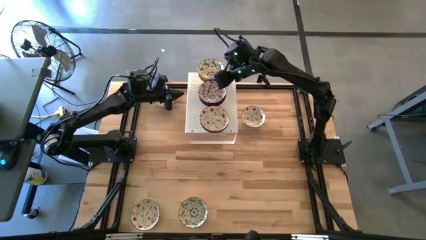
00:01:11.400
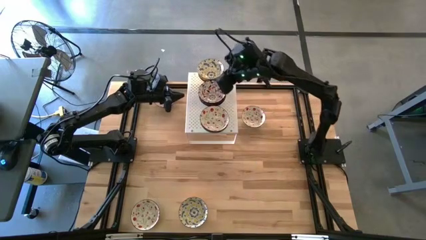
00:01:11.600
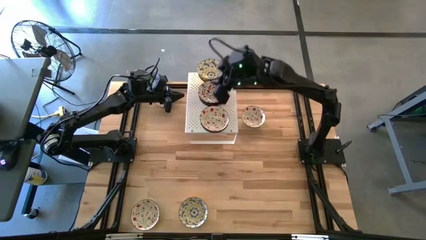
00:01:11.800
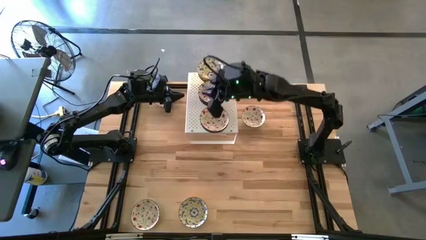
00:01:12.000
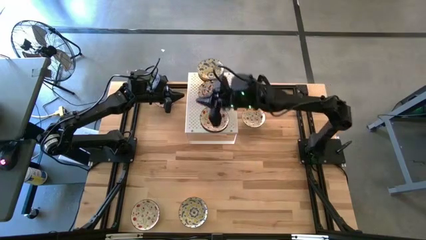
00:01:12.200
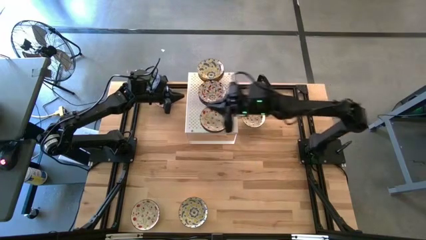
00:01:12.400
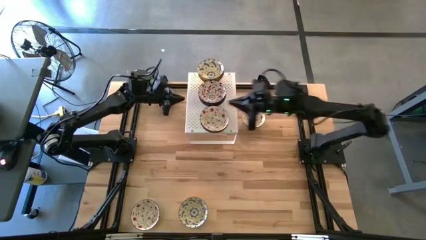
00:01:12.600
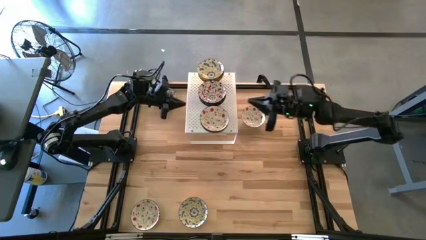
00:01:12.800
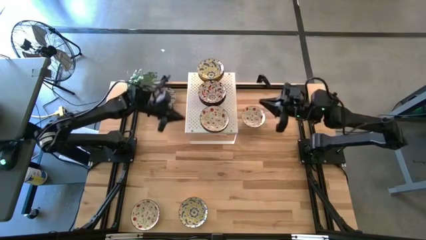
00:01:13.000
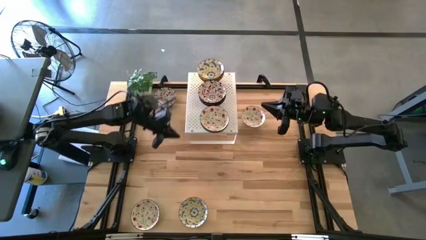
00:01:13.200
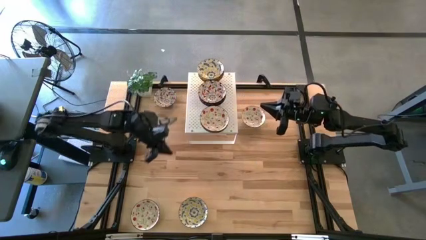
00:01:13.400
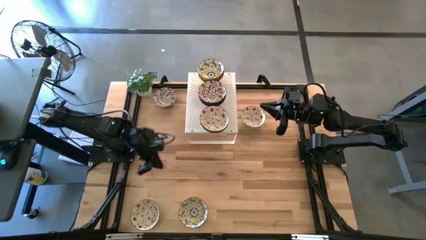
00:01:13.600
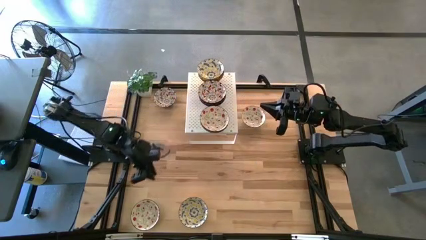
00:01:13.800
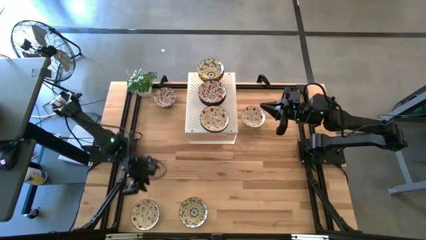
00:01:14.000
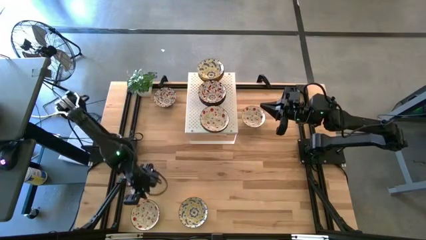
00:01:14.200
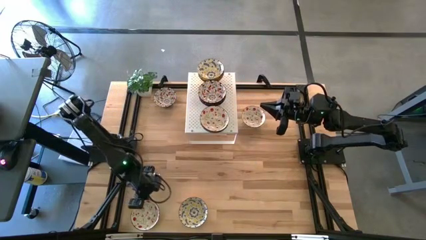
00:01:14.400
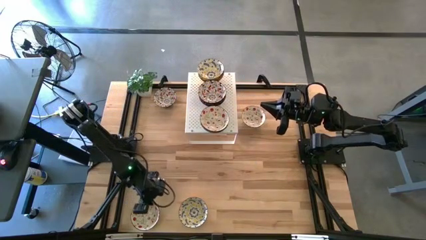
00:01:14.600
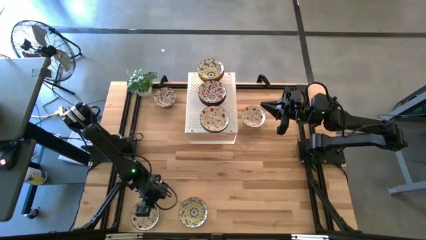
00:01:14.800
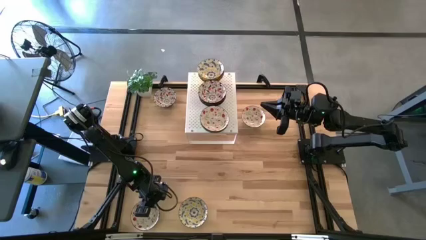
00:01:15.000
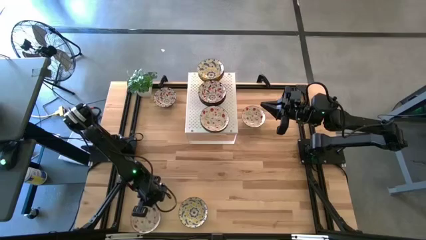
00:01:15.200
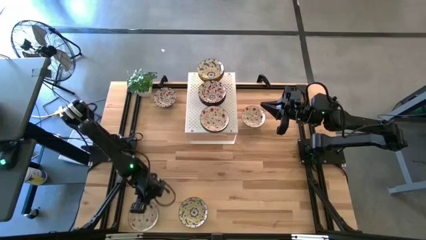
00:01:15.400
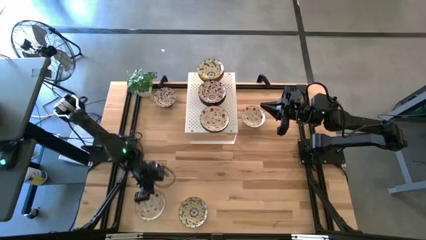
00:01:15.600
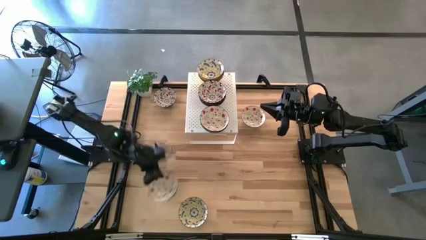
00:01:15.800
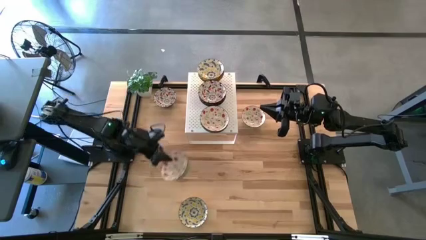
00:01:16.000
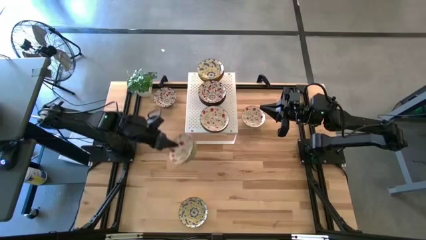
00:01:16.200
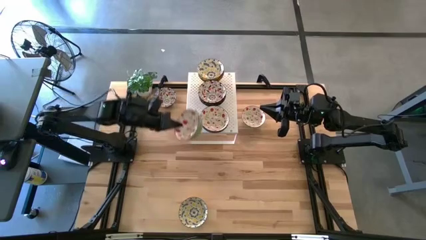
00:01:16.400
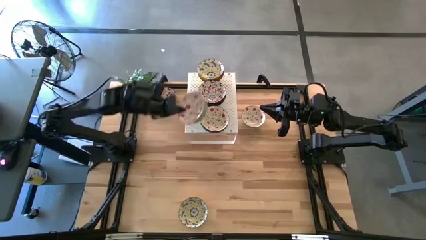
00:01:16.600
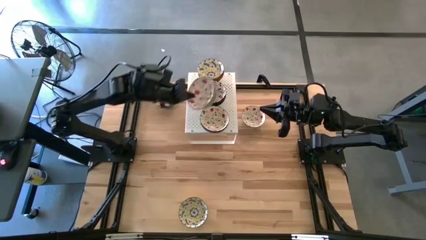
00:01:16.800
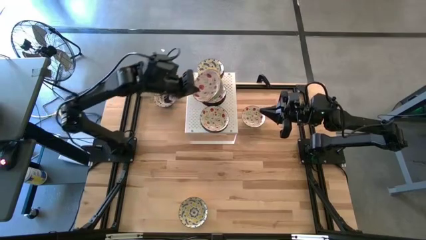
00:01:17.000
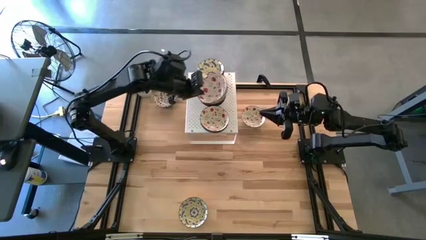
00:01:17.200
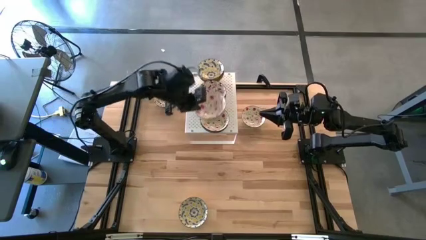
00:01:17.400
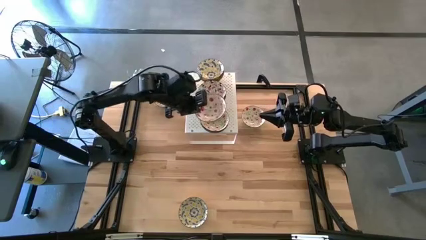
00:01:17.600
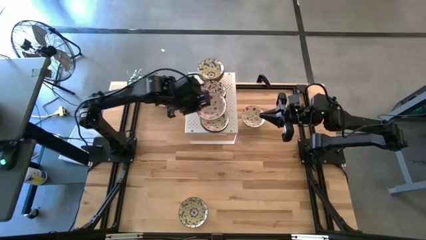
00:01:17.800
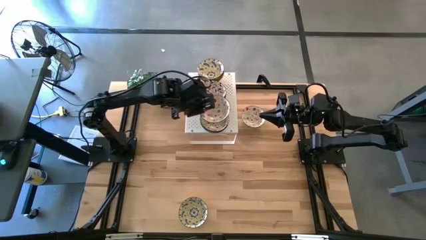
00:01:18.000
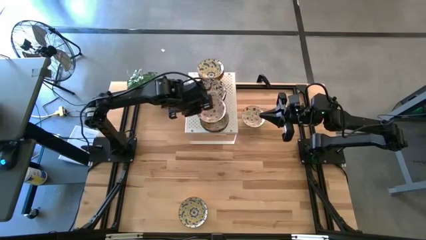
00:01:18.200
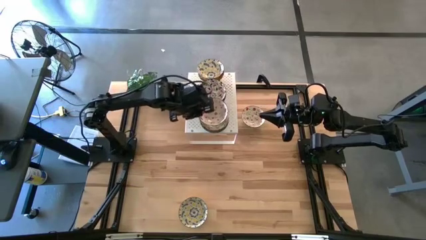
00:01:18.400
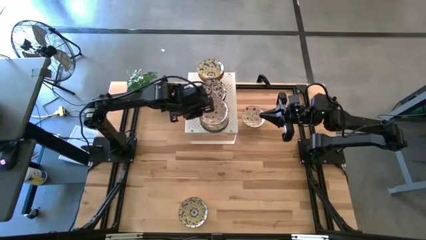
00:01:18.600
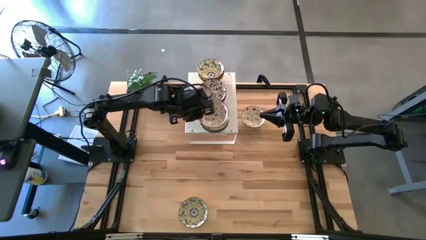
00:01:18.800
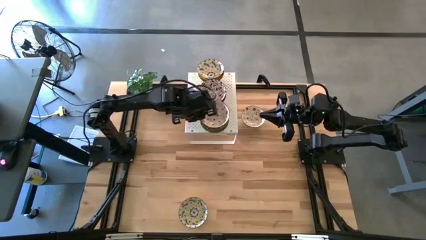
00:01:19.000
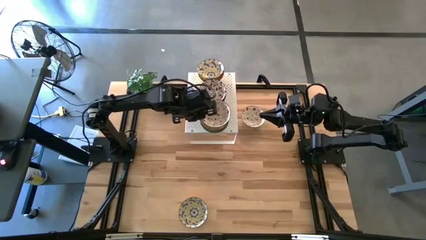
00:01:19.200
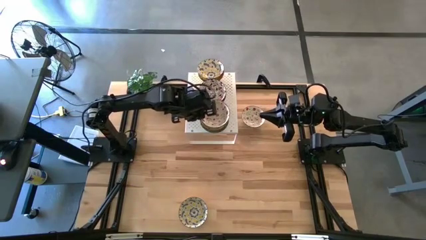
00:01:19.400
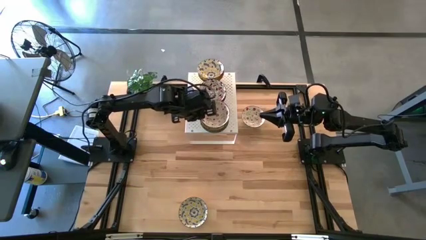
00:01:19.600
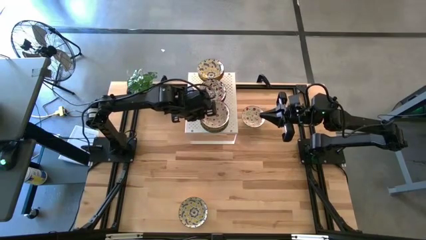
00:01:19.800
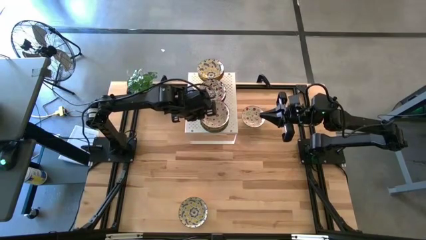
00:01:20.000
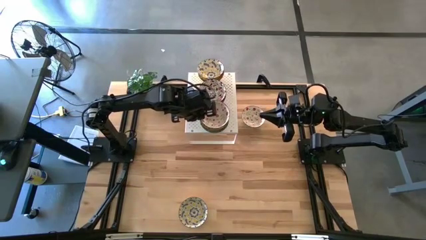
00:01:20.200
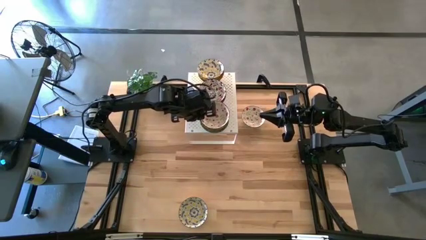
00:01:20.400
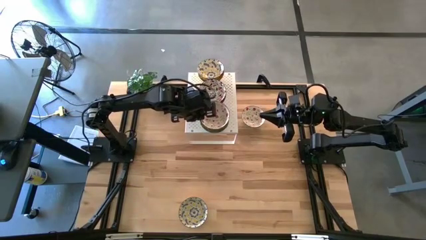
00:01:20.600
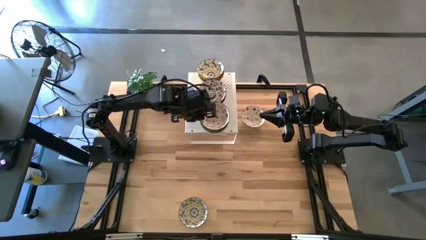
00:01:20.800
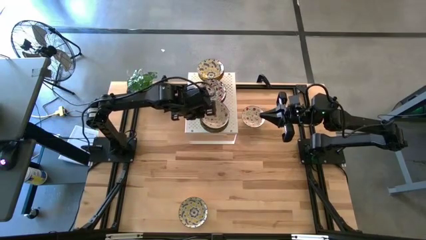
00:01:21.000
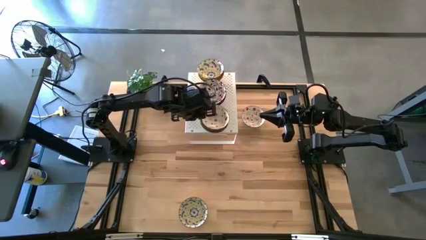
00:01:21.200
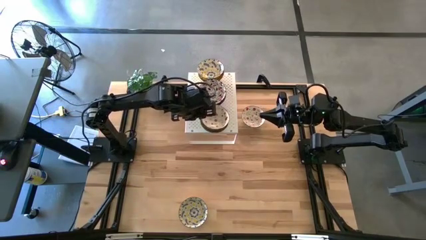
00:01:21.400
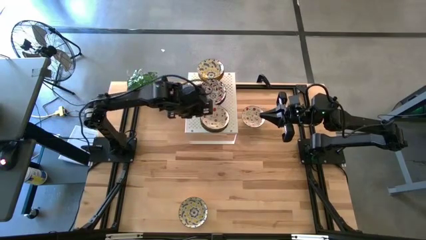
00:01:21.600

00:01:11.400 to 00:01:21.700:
Task: Pick & Place Mini bowls
Stack the red patterned bowl on top of the red patterned bowl

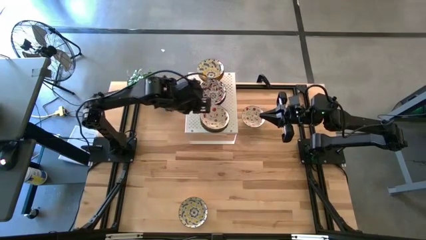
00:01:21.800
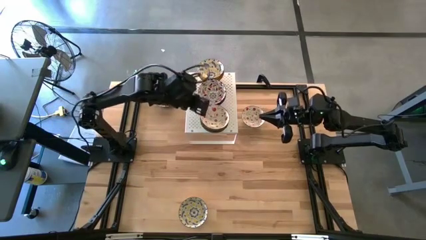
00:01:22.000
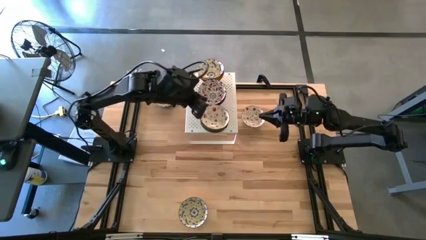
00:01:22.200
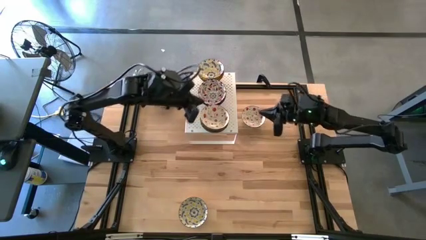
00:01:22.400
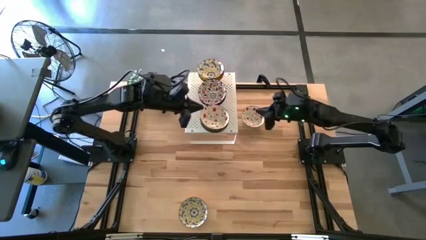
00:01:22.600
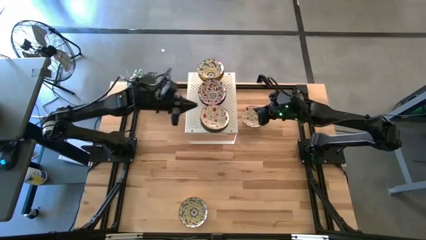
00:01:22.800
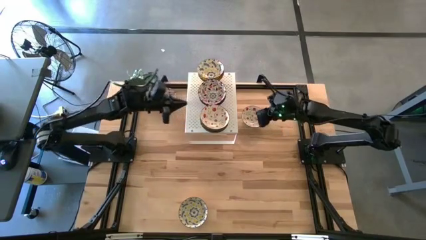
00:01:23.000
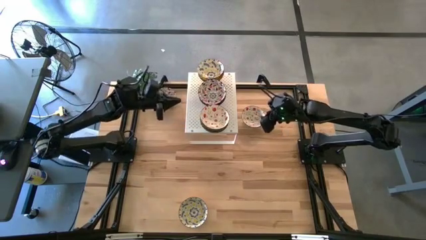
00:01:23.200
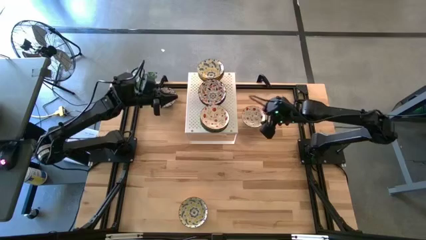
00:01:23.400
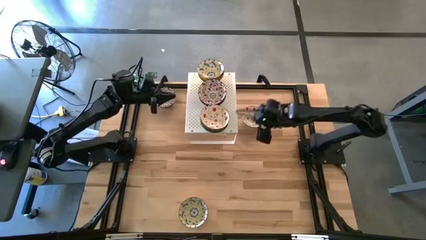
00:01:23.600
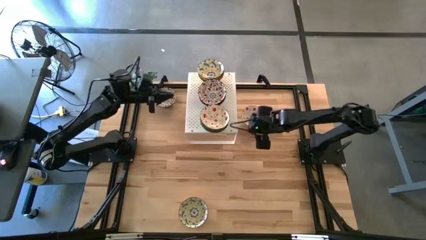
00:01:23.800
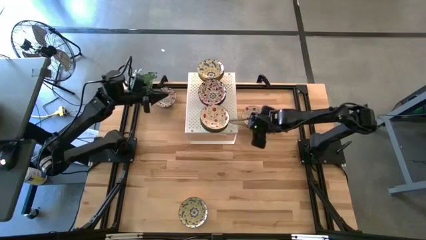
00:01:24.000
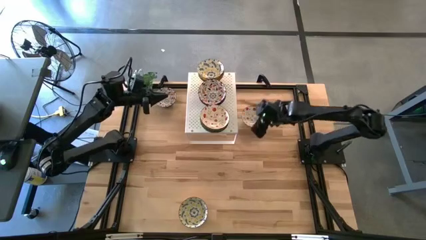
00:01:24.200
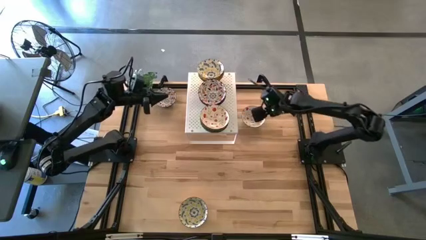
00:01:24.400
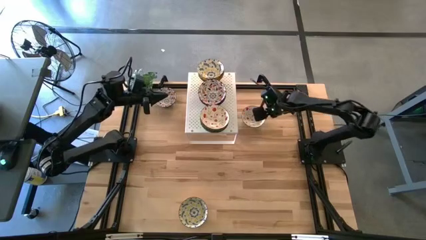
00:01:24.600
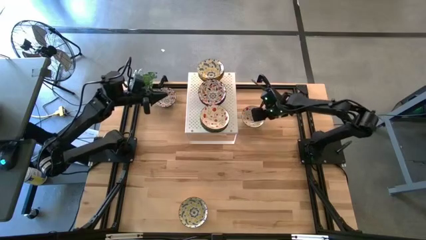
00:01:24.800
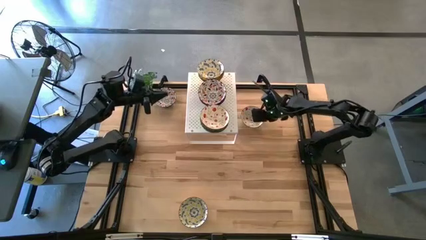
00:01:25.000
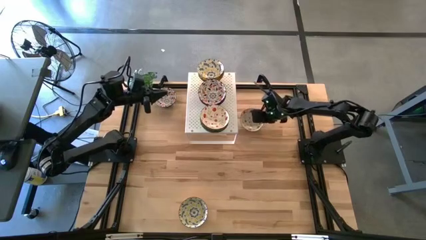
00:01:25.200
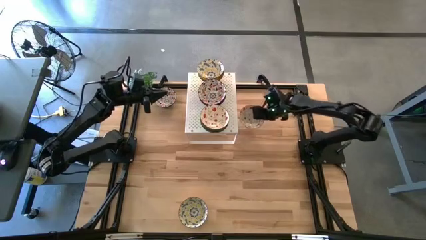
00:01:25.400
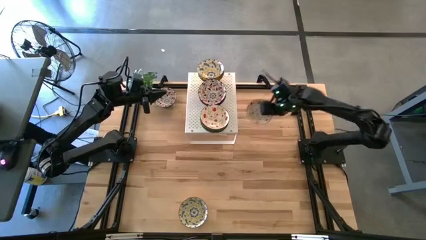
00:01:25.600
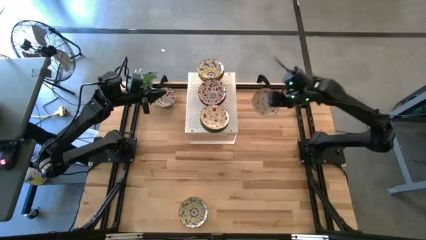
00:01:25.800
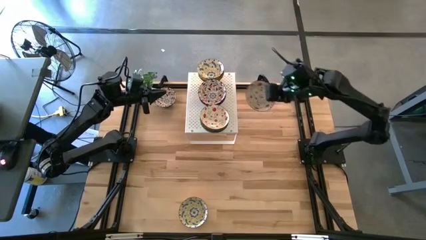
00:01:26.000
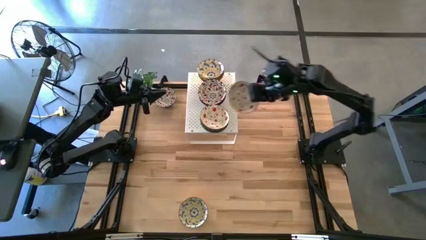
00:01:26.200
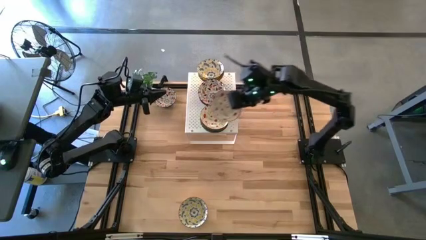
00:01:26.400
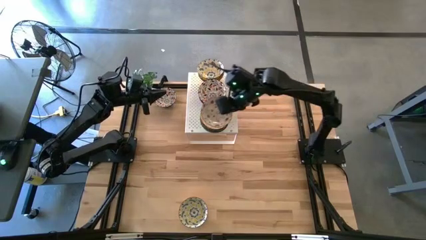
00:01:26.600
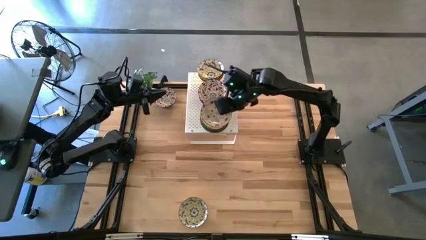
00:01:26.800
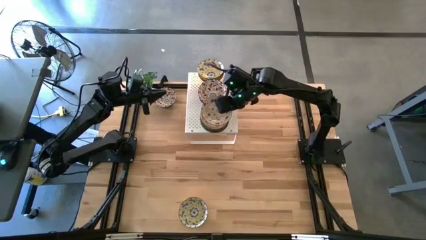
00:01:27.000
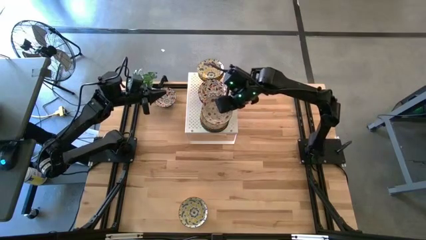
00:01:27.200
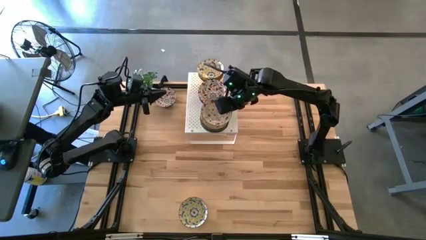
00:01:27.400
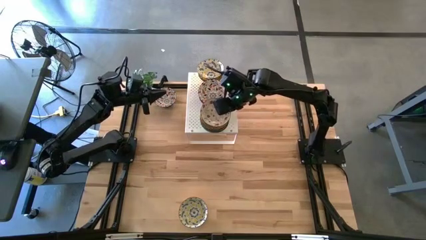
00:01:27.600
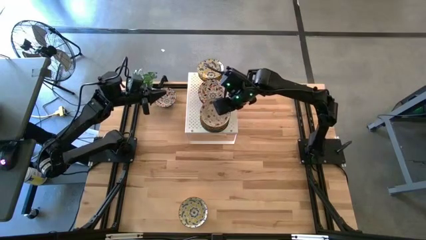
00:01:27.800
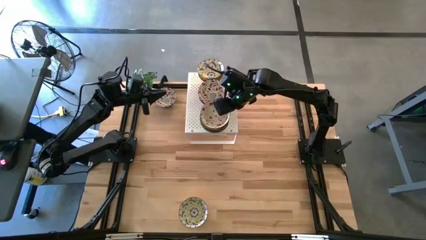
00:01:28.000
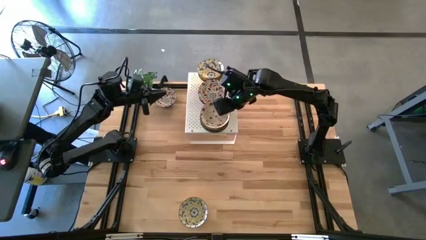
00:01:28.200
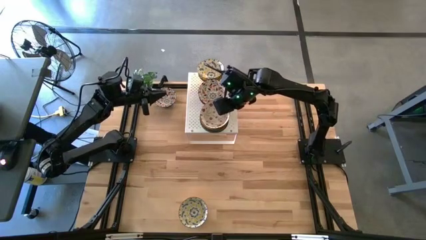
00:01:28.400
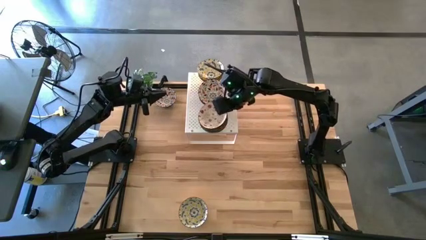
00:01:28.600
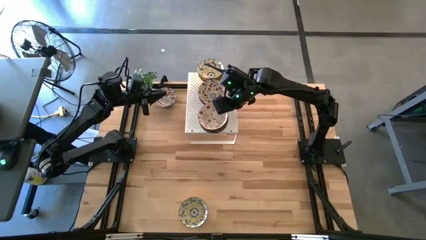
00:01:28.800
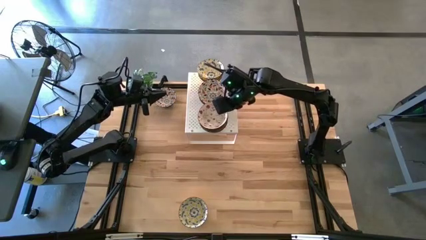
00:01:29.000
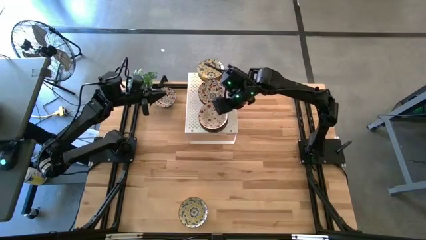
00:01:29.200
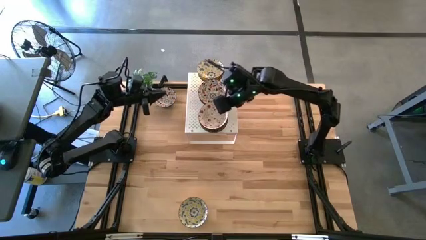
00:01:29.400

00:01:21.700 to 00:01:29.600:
Stack the red patterned bowl on top of the red patterned bowl on the shelf
